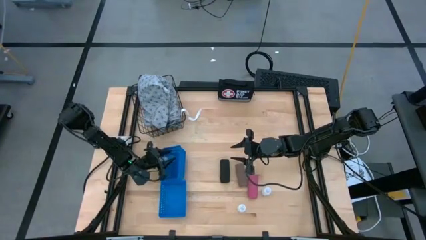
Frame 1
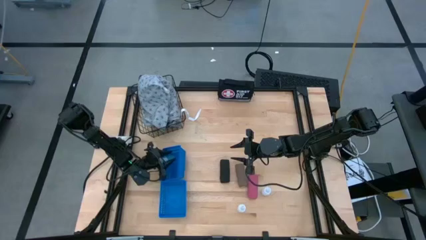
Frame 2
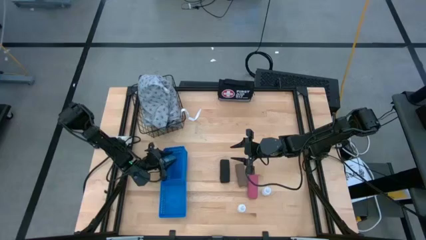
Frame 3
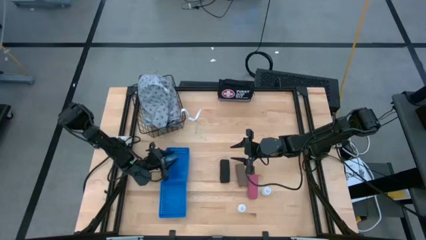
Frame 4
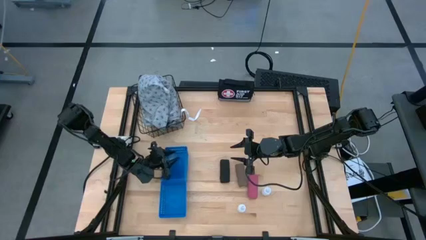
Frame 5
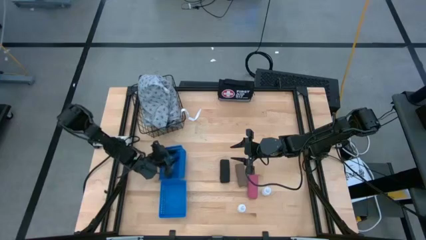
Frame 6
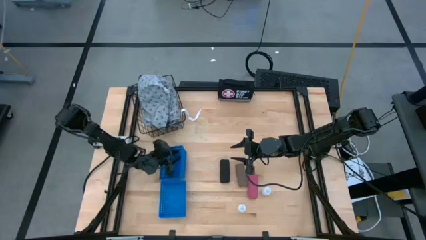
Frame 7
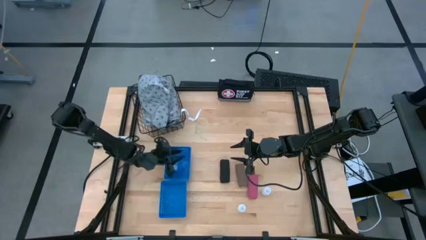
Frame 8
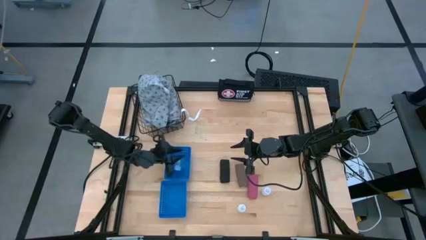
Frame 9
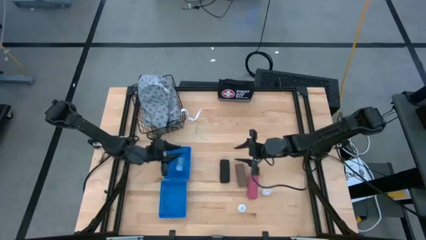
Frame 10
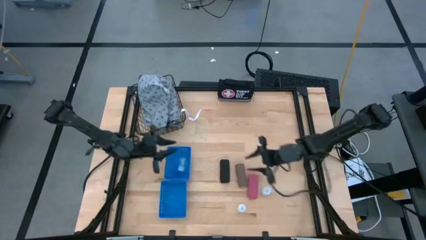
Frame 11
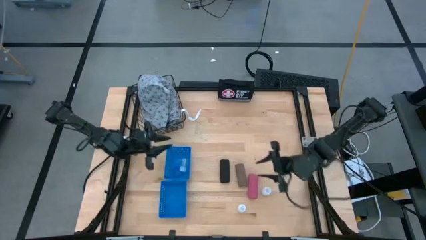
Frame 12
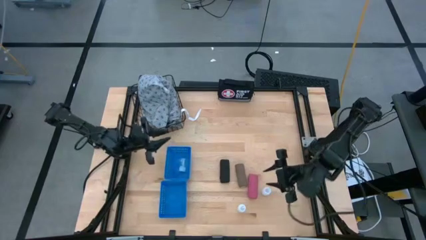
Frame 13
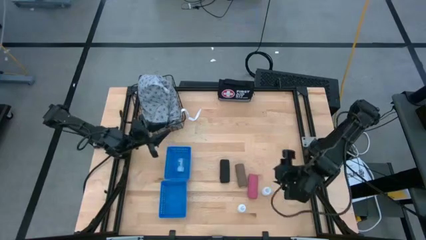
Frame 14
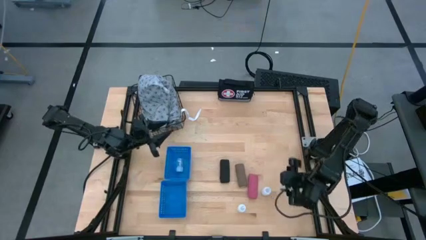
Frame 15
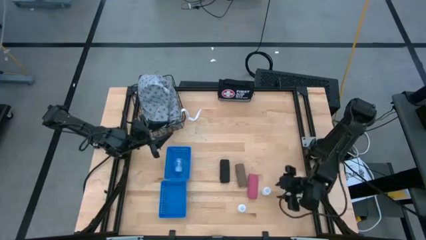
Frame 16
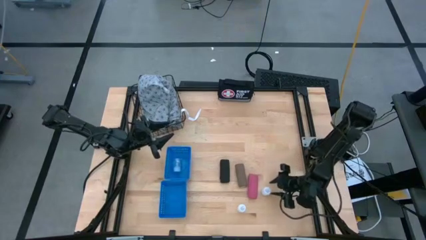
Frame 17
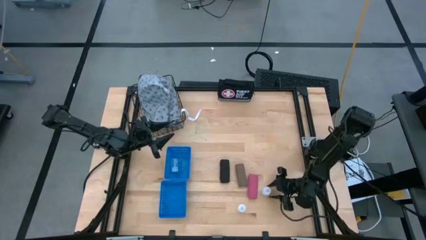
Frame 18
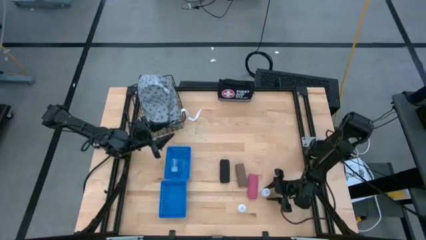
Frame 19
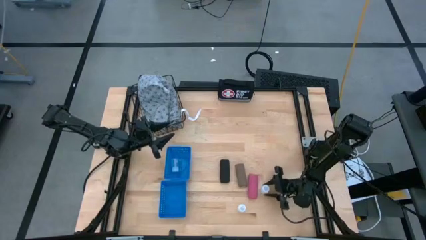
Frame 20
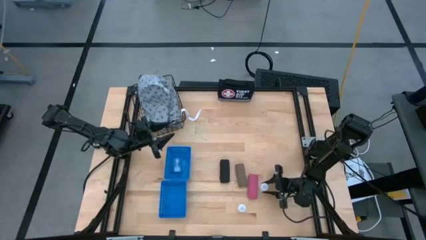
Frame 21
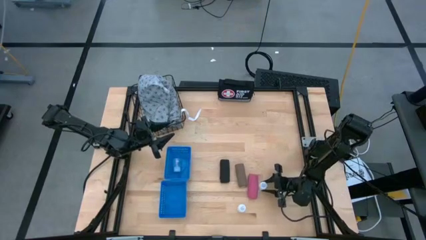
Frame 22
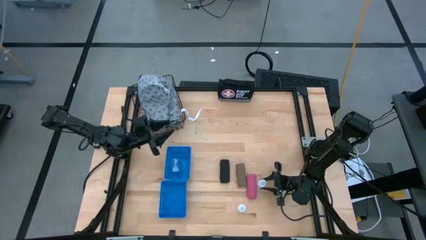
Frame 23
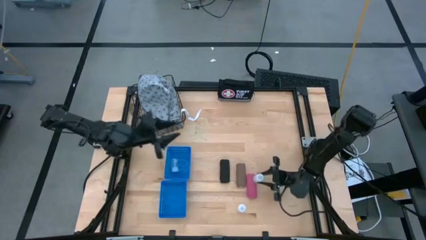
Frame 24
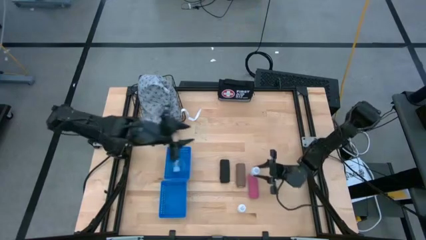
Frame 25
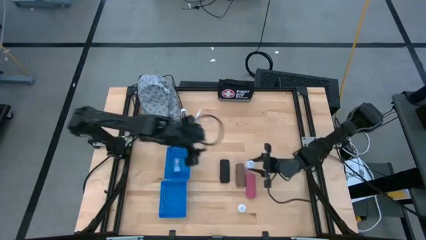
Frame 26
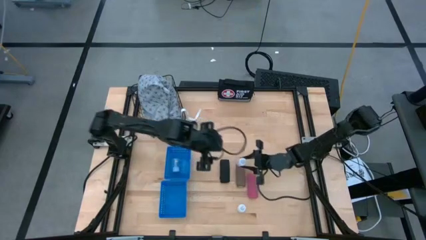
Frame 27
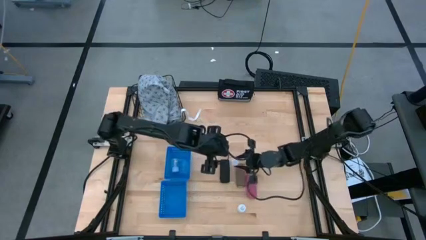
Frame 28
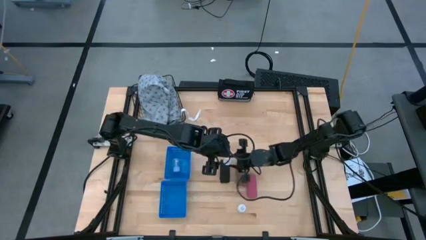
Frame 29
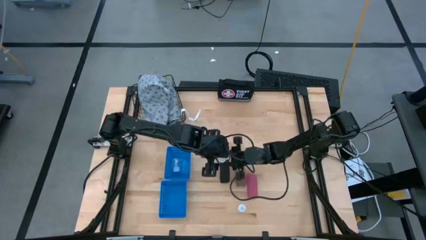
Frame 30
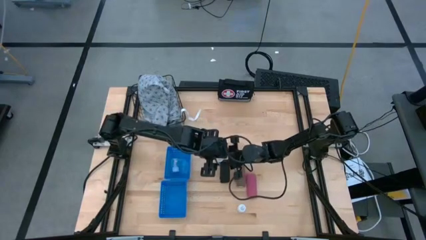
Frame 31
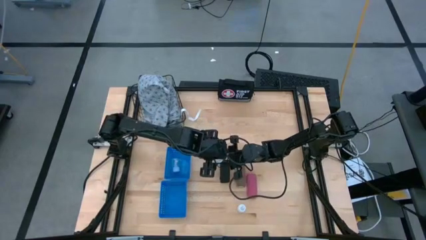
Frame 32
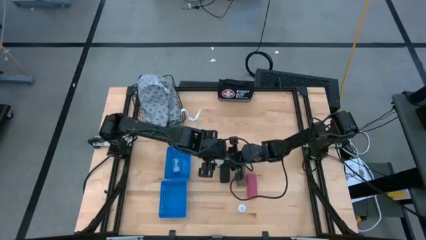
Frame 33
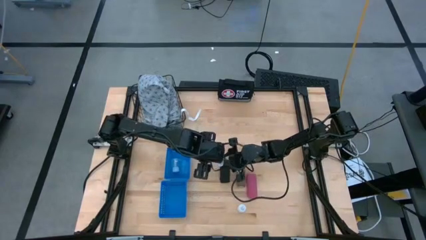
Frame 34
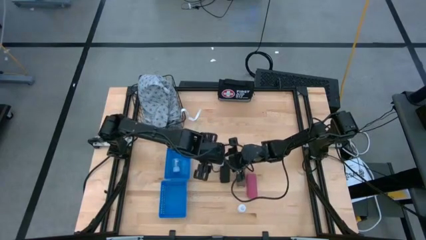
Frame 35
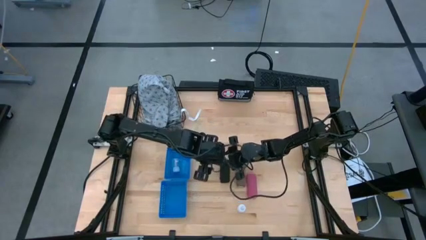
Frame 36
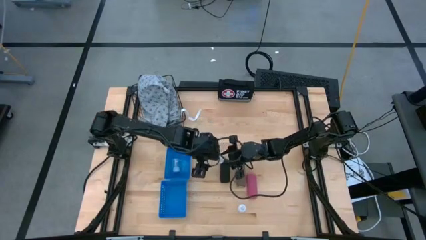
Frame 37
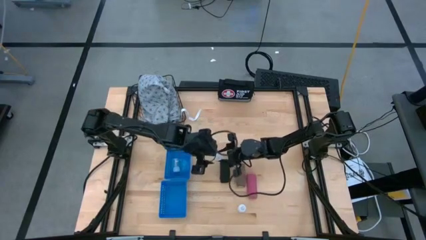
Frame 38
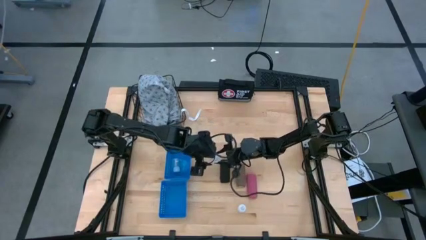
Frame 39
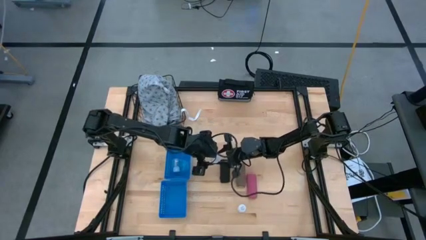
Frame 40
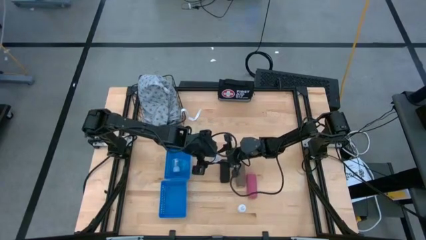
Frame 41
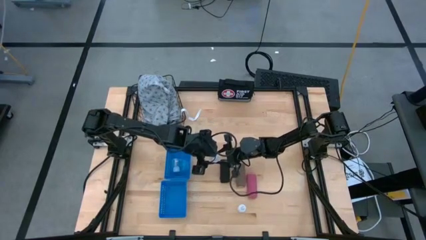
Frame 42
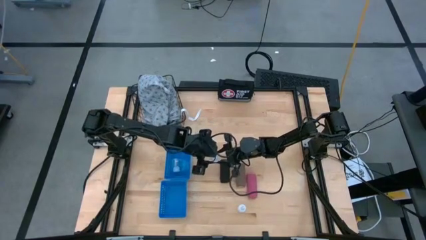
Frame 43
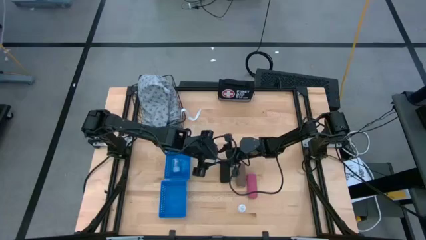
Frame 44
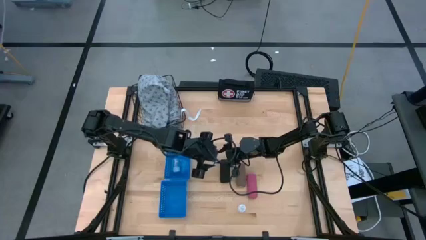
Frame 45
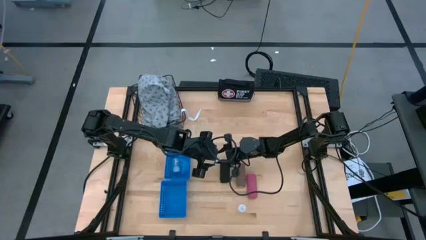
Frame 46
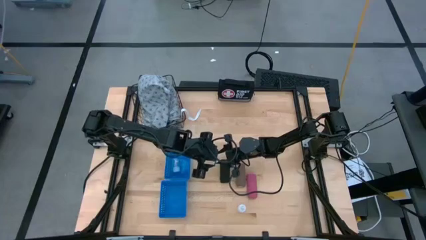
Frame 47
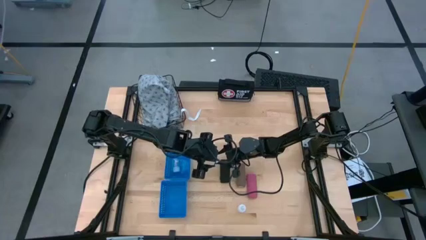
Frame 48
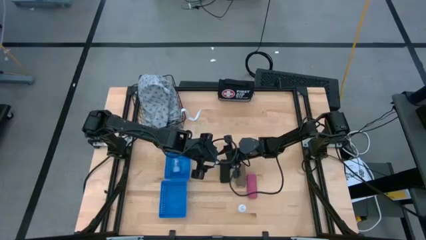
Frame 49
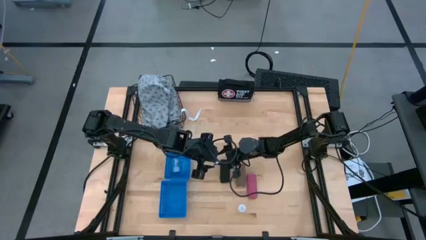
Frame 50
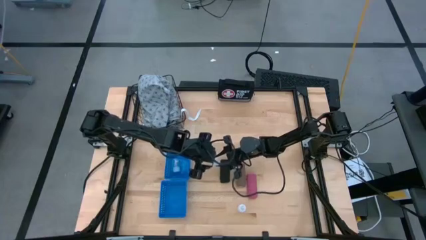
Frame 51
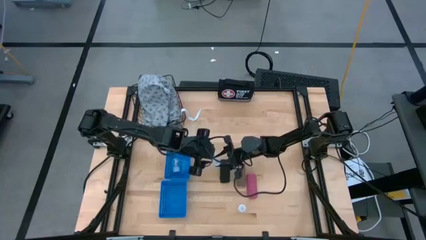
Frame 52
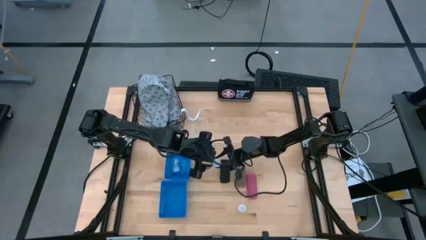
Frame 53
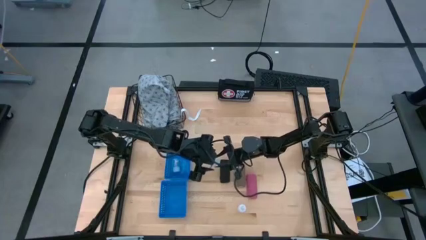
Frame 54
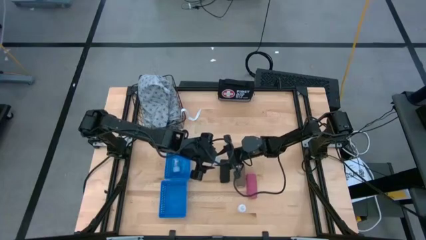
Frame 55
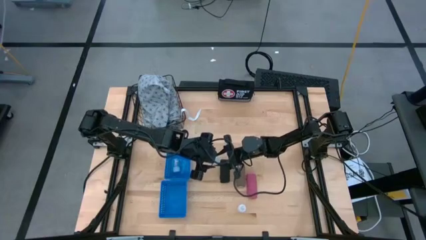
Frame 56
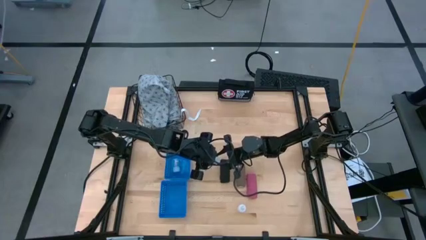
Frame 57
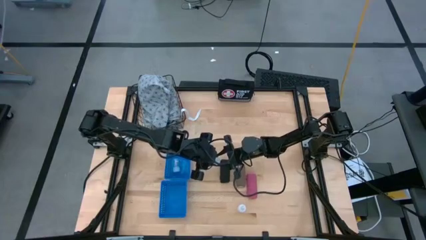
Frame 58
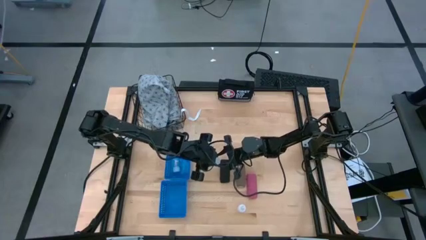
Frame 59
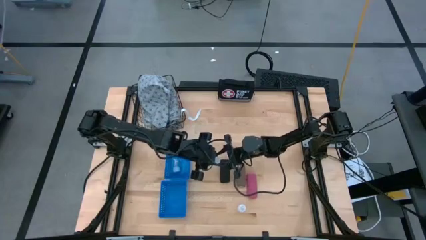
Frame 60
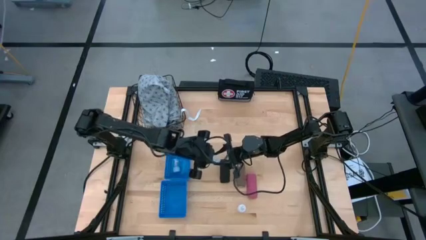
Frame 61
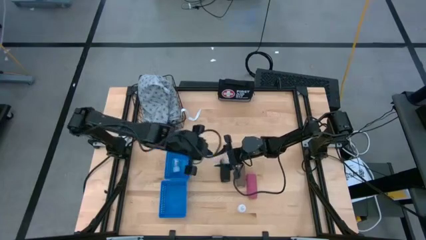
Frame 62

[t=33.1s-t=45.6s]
Task: Pick & Place Medicine items
Put the top white pill bottle into the top blue basket

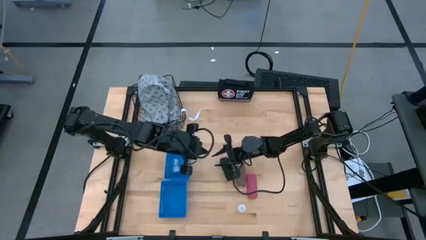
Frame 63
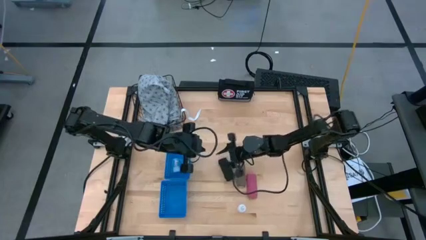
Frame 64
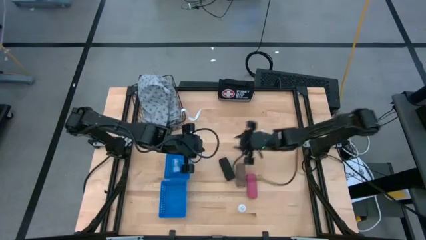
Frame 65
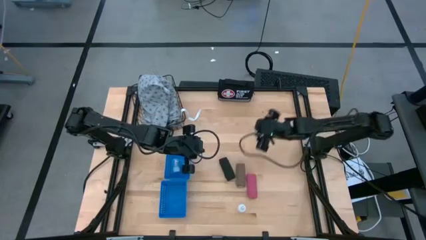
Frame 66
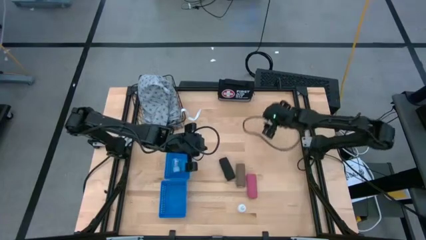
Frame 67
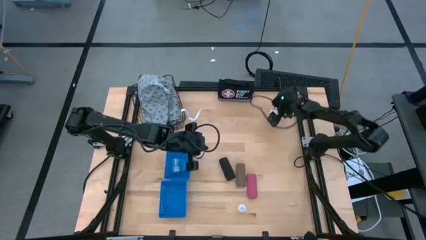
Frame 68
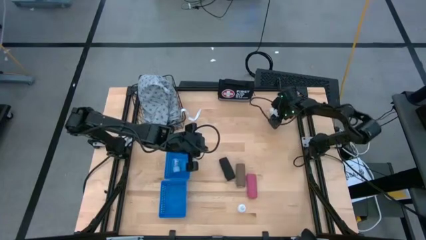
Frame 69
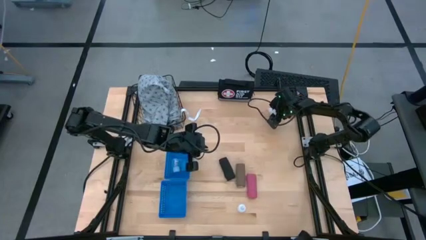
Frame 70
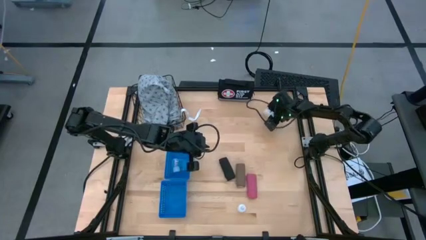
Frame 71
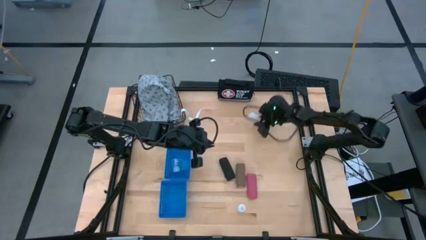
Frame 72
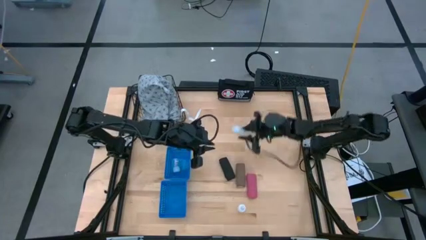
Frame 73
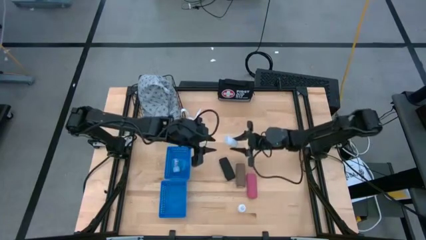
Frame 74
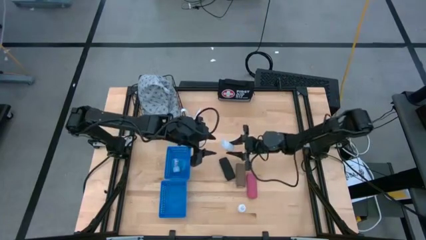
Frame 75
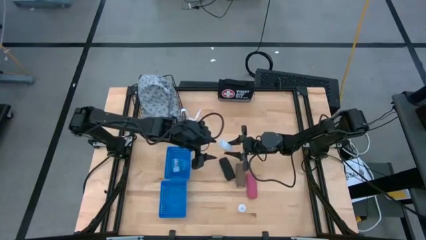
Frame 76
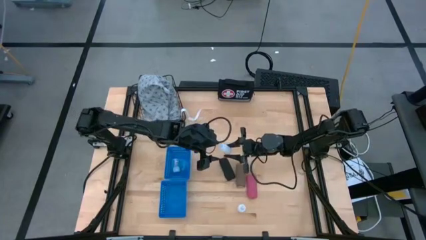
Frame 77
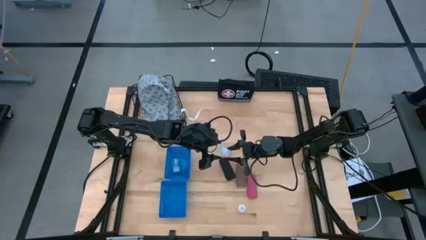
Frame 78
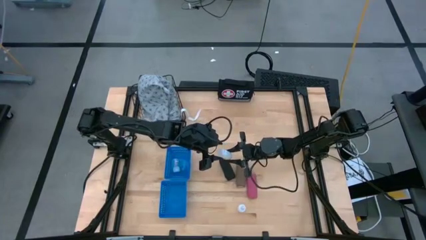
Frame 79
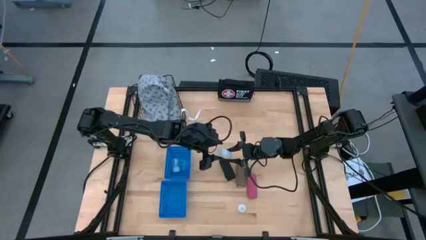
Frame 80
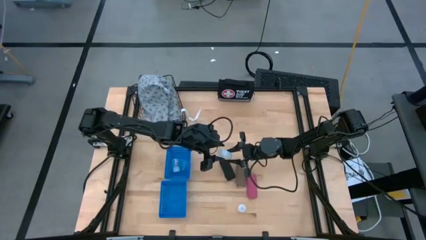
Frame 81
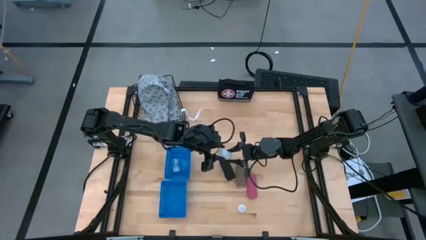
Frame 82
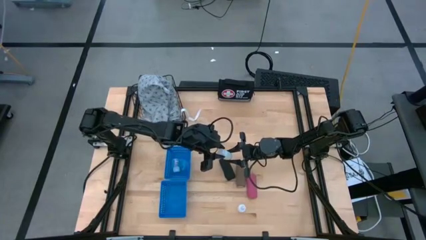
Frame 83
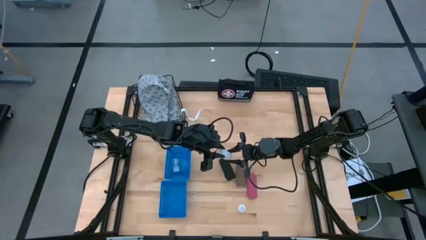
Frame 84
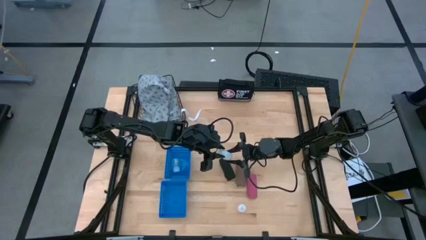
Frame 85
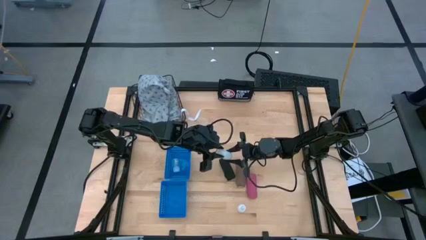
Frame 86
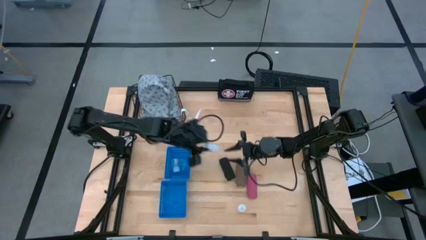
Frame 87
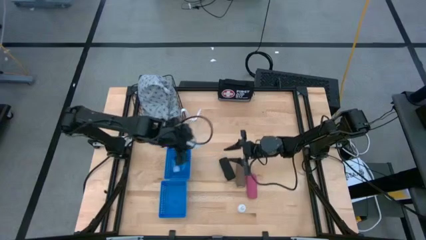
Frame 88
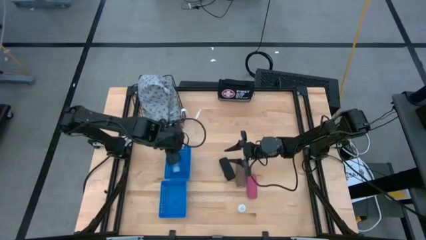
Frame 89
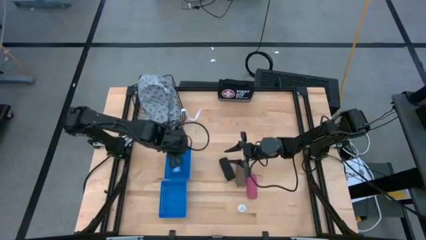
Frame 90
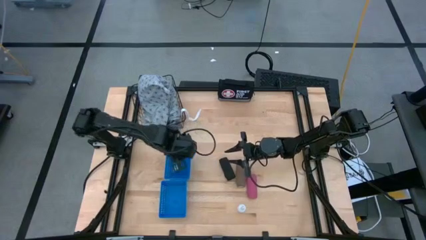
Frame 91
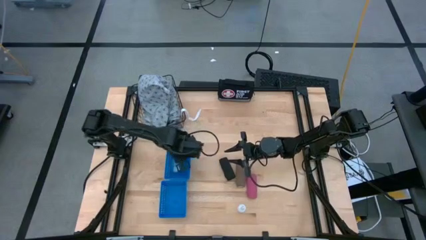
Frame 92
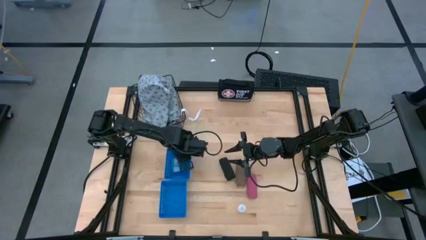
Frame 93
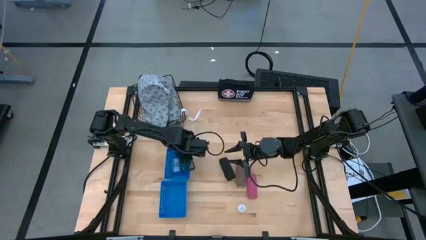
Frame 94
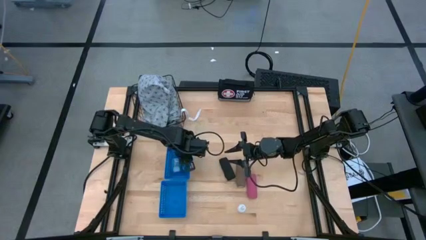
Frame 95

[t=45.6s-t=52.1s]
Put the top white pill bottle into the top blue basket
